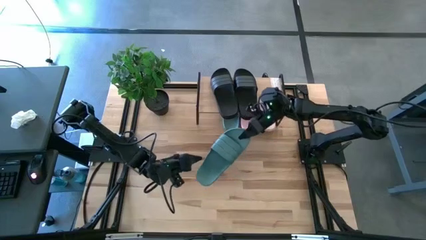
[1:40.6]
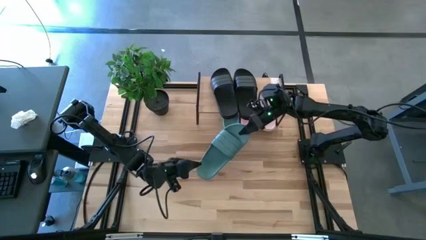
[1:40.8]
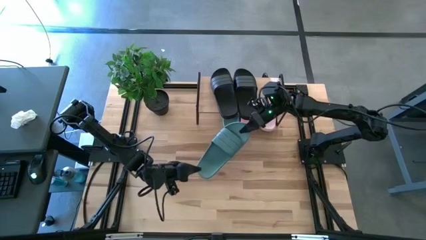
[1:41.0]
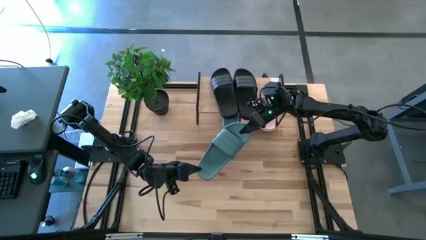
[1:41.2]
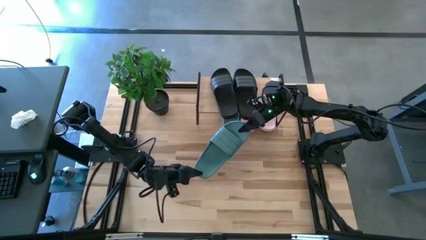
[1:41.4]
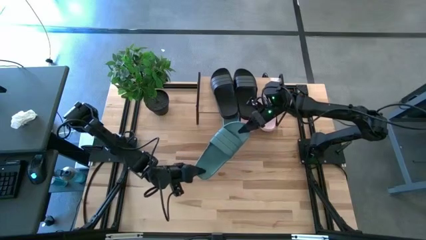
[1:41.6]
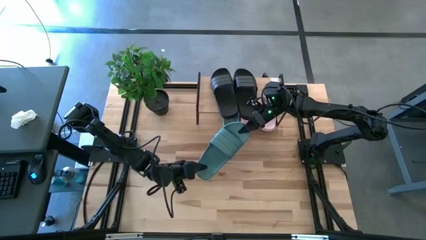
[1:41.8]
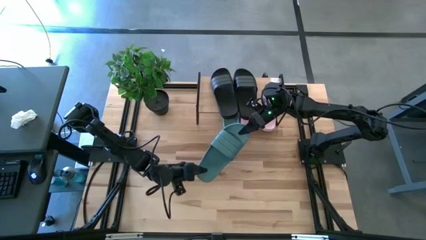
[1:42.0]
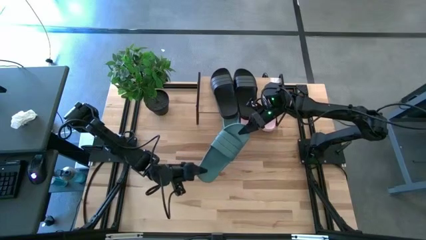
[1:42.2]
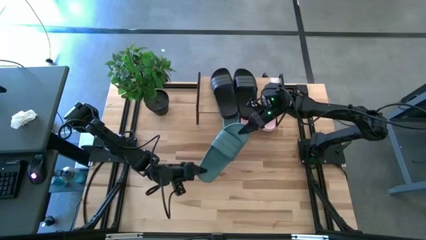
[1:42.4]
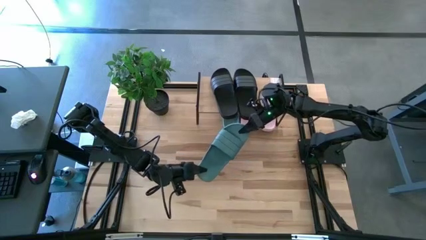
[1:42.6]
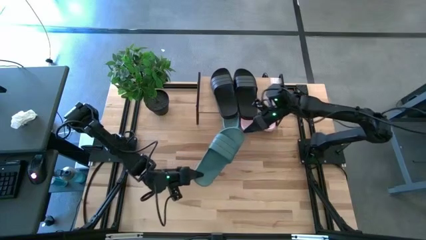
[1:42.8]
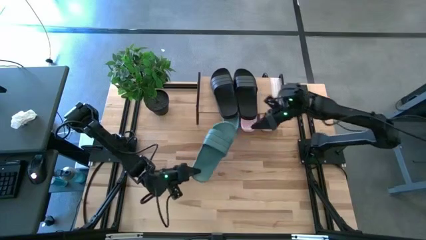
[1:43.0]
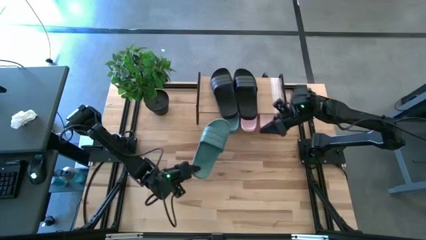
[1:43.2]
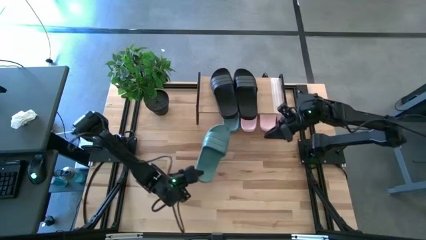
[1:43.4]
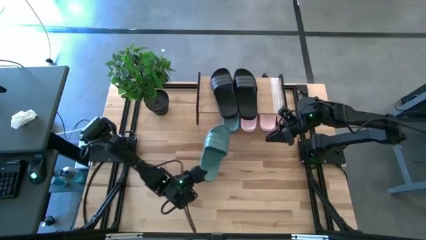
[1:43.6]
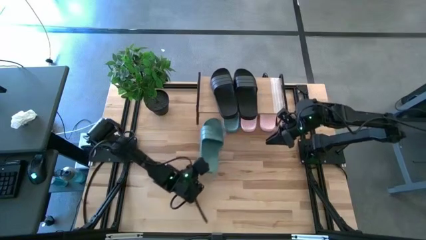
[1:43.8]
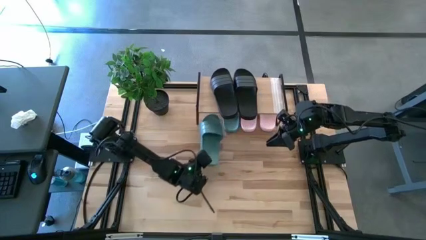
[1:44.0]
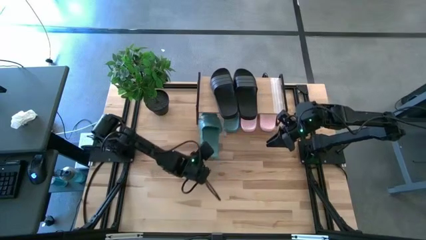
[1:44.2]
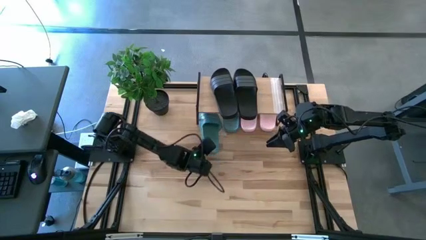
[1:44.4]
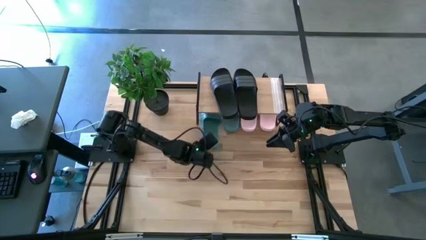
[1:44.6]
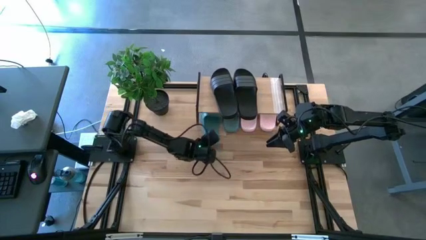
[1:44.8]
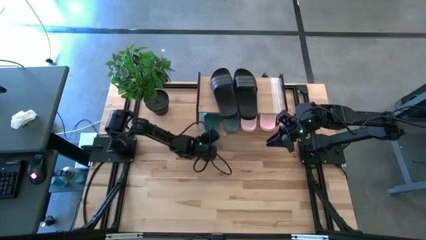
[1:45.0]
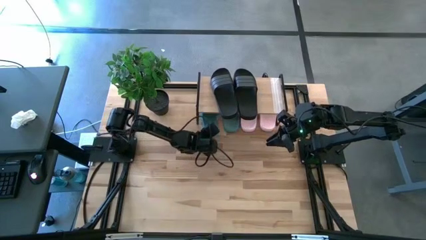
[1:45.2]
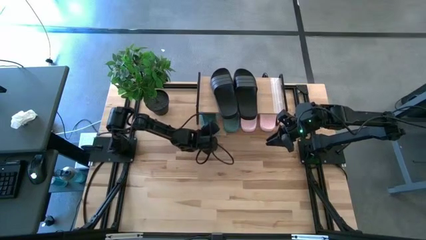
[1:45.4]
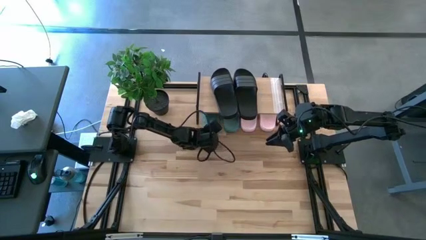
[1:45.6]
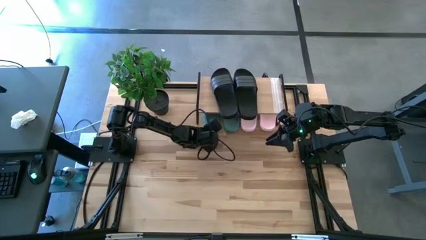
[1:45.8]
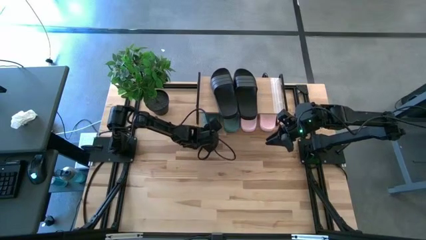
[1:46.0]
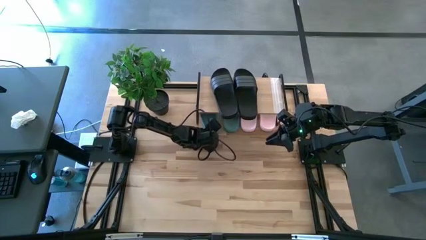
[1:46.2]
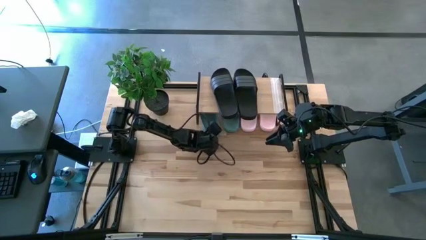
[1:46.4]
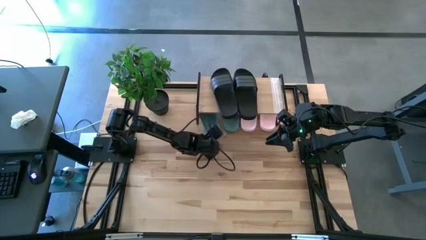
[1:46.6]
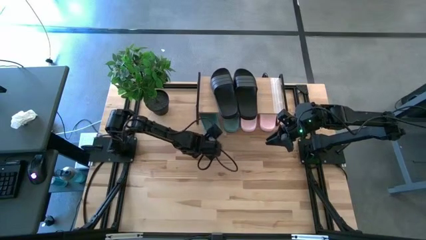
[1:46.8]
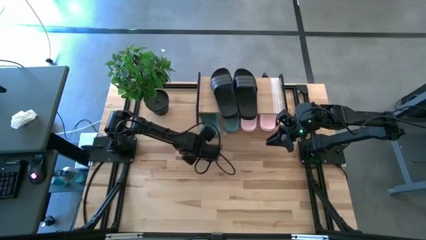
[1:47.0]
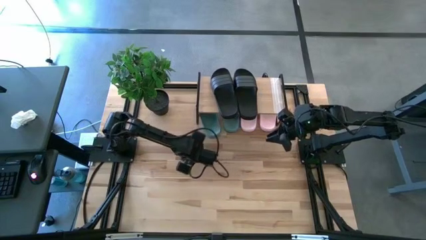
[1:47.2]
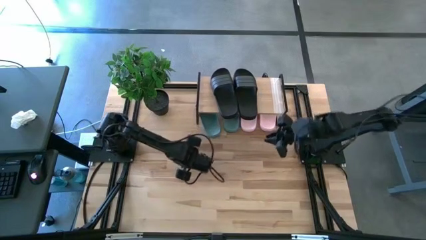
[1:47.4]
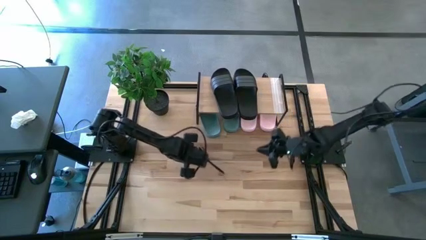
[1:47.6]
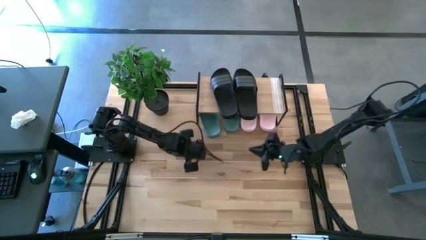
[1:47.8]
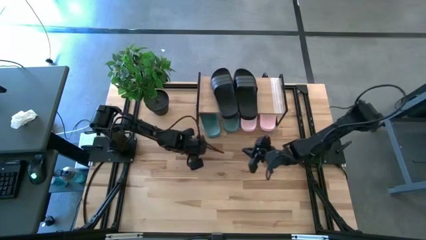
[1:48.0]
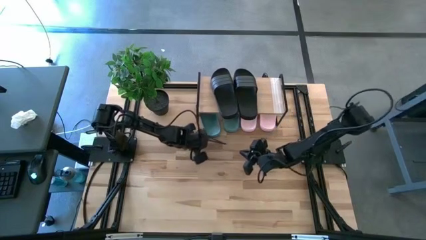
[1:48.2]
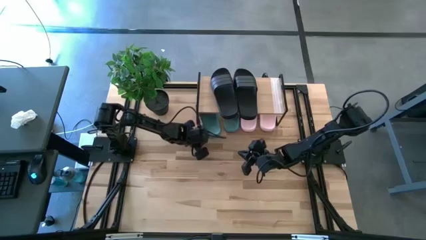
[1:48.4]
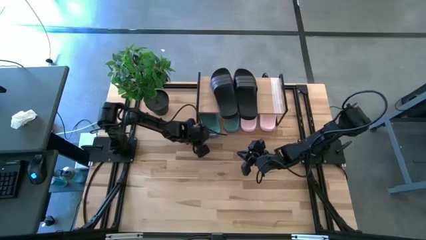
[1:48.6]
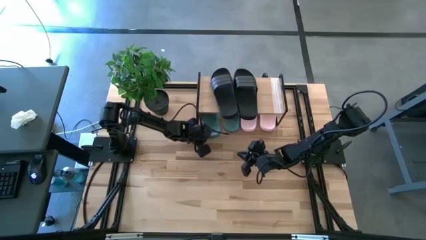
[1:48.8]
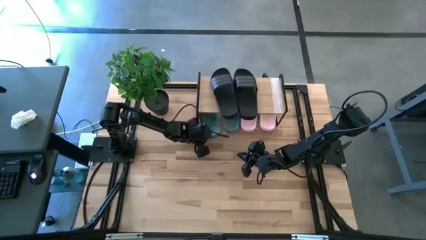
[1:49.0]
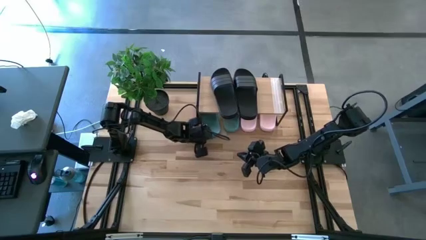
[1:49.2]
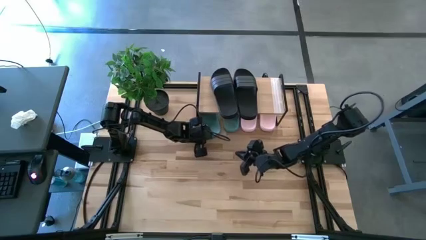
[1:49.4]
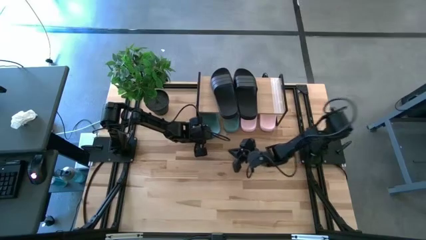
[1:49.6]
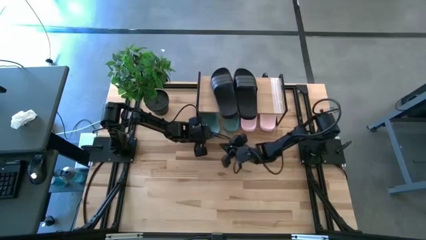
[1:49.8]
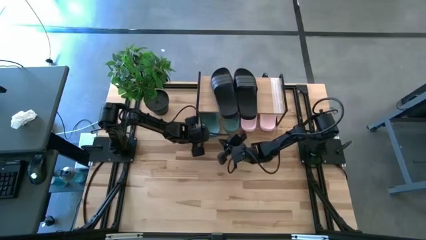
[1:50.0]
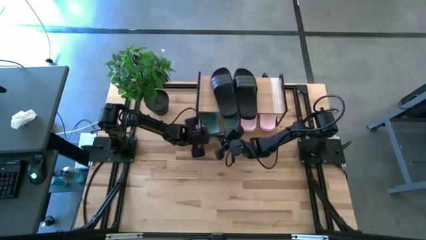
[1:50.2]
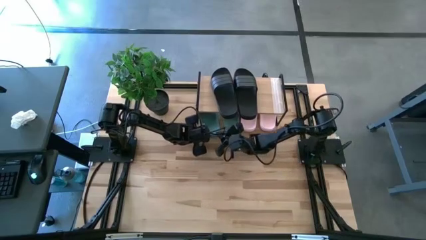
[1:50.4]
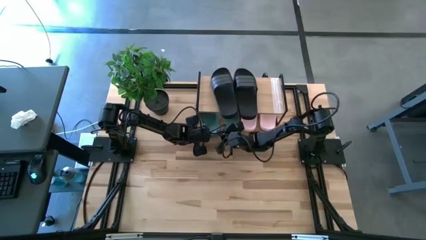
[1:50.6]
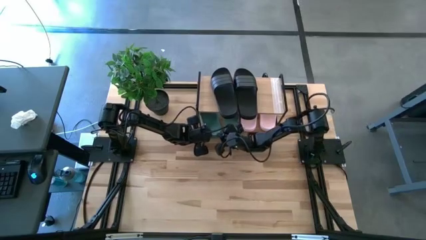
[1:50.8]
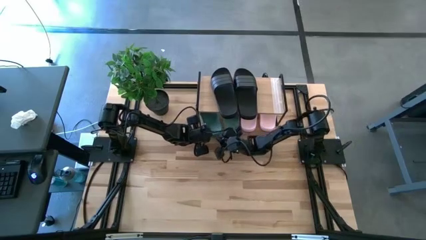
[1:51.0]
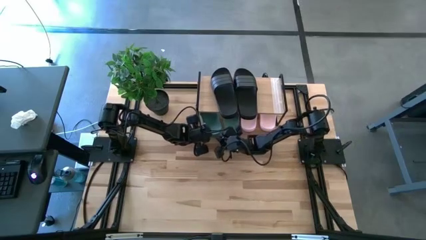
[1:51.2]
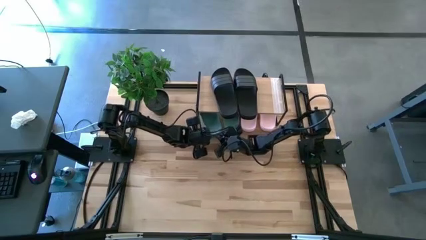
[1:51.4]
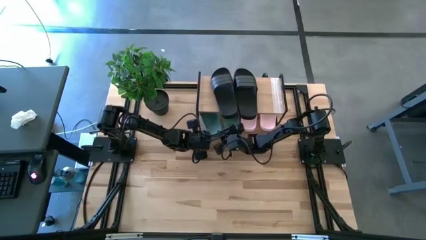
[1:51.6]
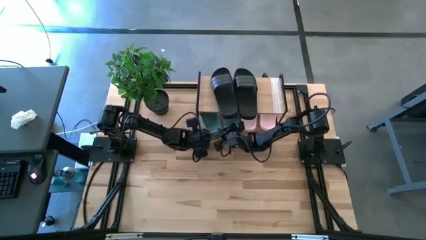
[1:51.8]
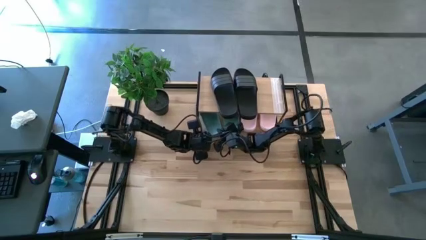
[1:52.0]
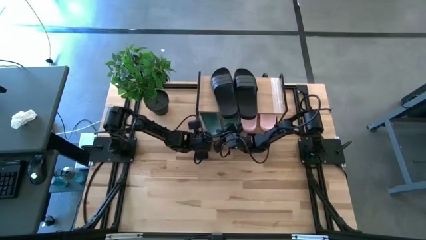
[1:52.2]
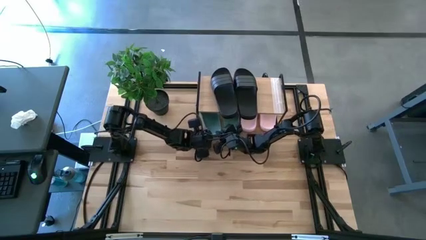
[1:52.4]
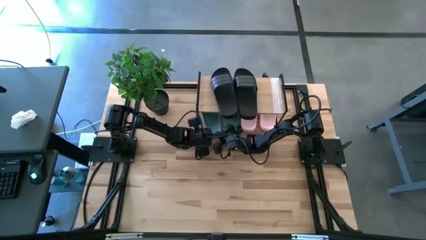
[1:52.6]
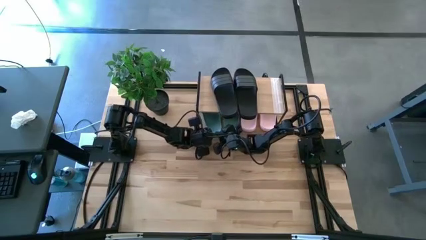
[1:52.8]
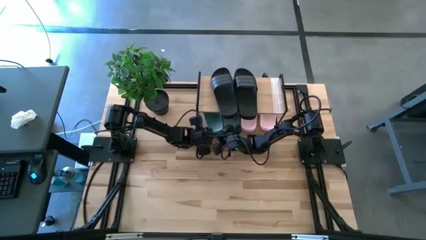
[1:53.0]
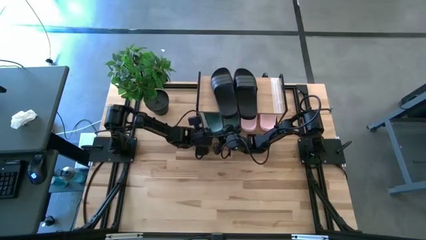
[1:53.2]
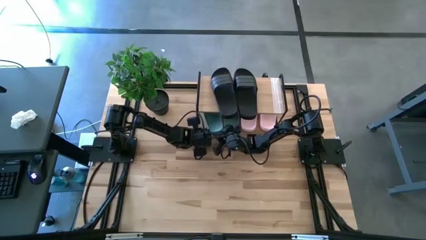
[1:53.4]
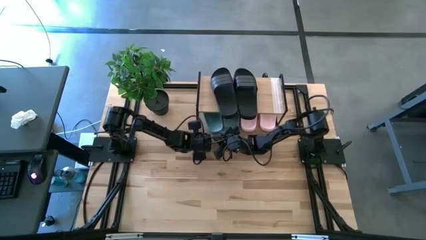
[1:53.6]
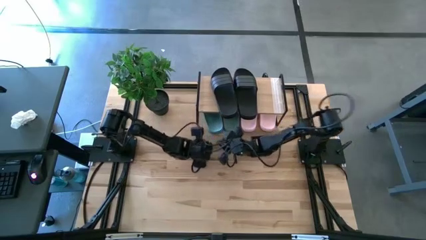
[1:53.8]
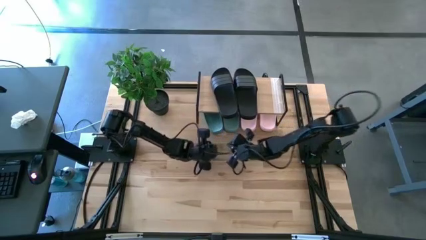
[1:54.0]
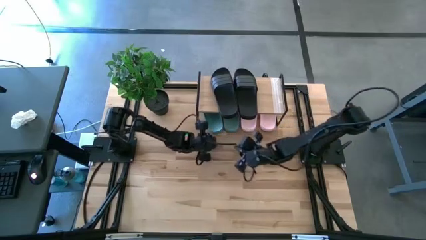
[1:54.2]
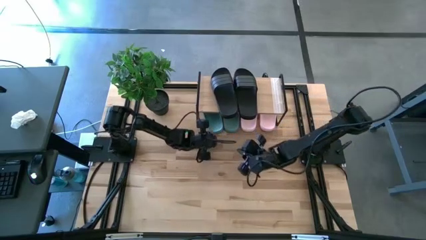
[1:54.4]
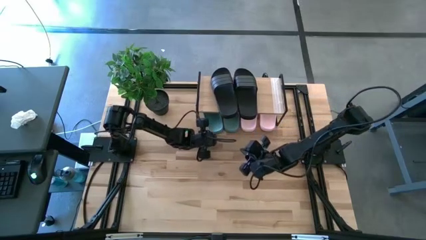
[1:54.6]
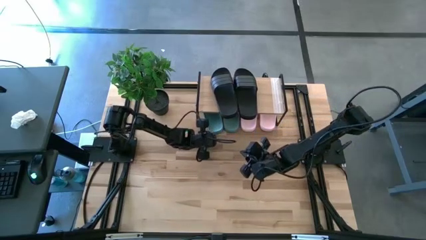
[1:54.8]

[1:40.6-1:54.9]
Task: Pick and place slides into the shelf
Put the green slides under the shelf

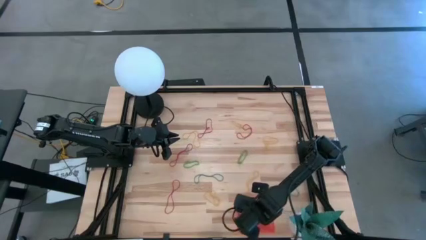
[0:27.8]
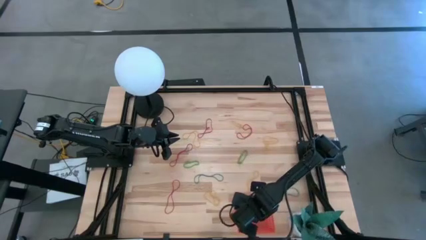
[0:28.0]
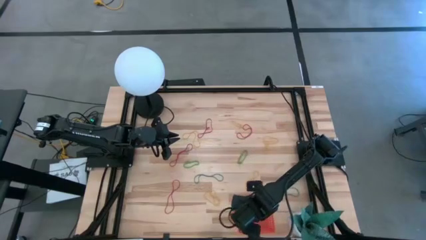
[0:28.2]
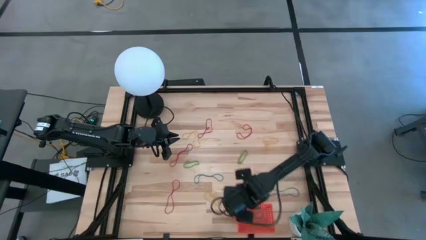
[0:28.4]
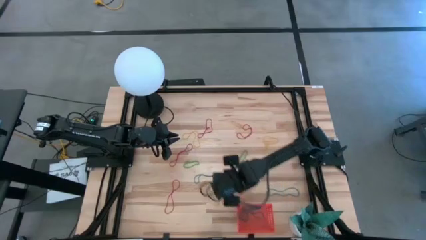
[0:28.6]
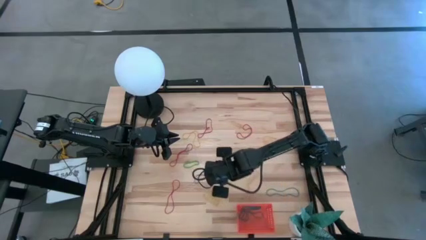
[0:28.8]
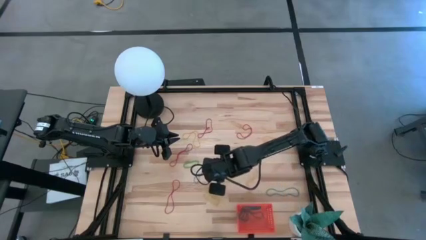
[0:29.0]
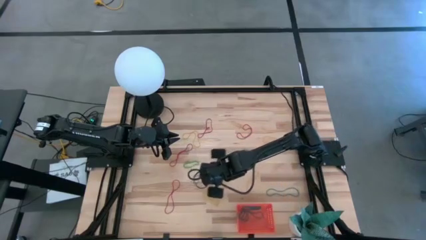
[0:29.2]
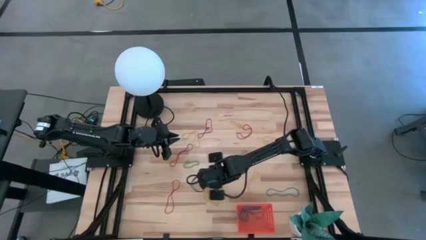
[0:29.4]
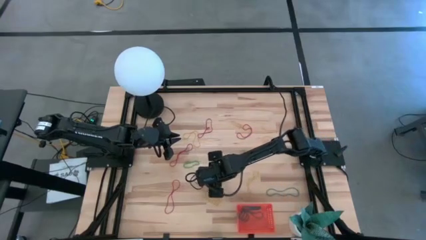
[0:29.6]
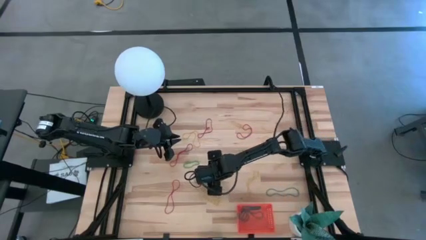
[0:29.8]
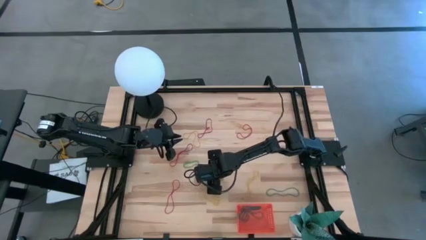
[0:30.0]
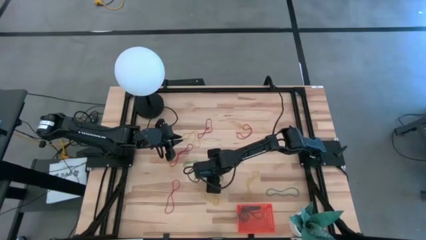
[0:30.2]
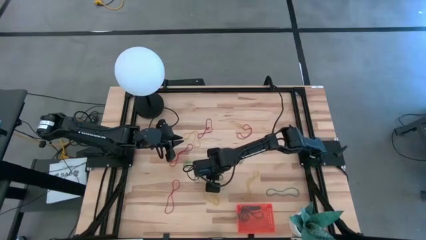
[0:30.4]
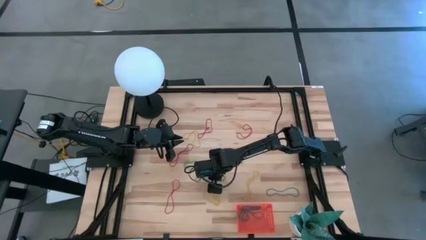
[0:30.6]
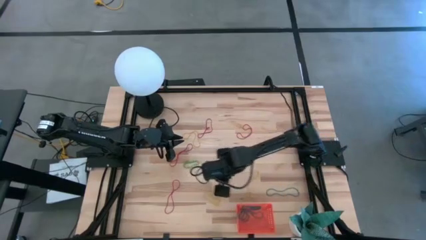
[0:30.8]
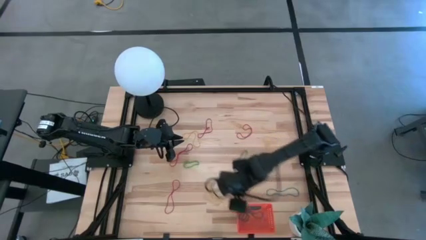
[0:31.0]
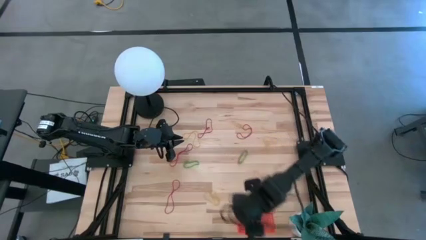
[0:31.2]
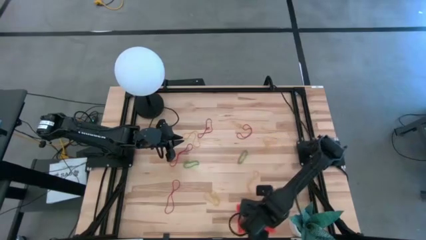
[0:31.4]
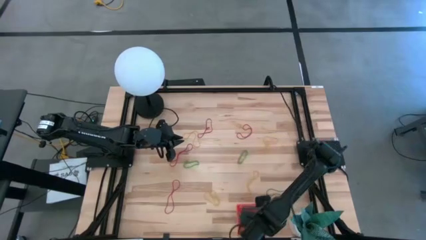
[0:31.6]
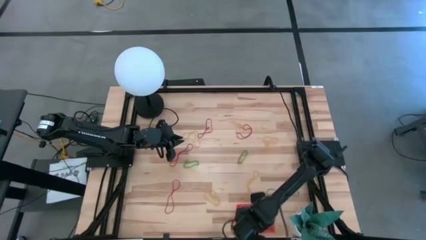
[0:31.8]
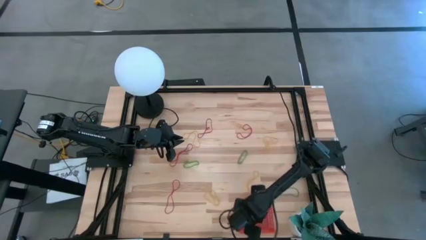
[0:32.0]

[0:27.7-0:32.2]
Task: Pick and place items into bin
Put the blue rubber band into the orange bin
